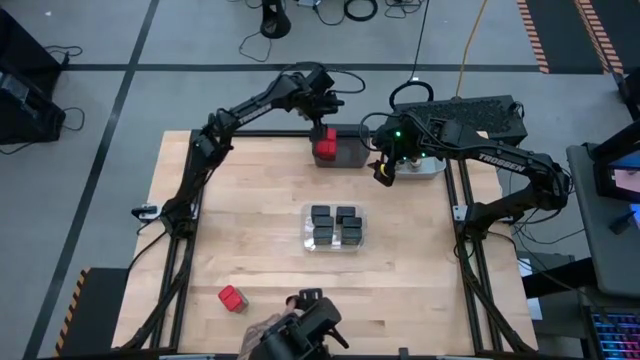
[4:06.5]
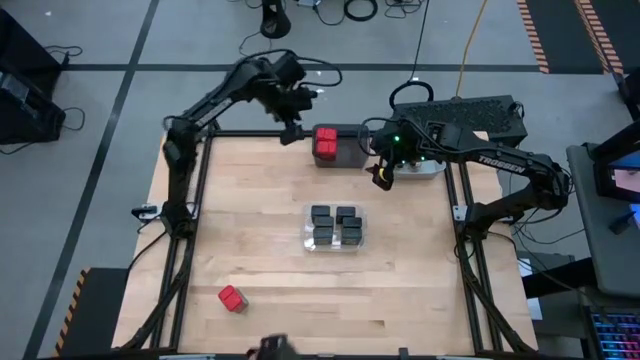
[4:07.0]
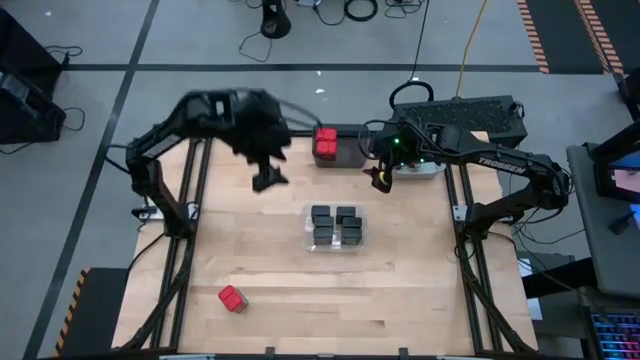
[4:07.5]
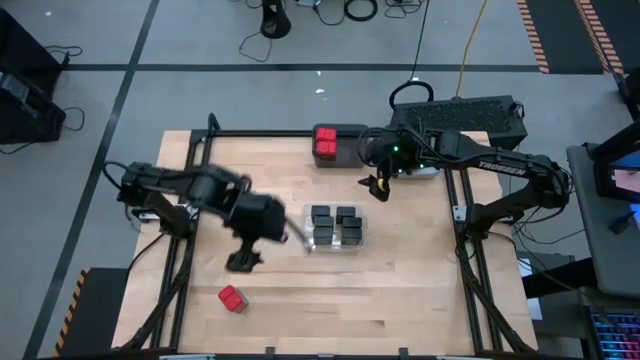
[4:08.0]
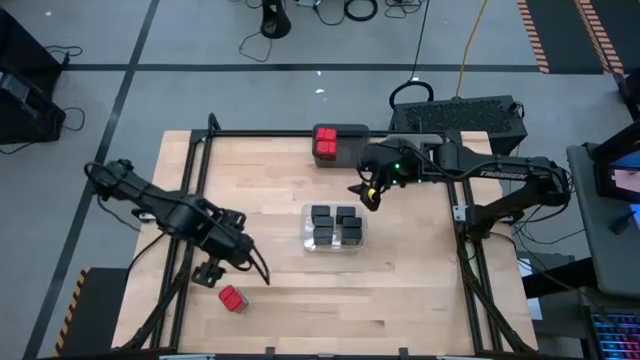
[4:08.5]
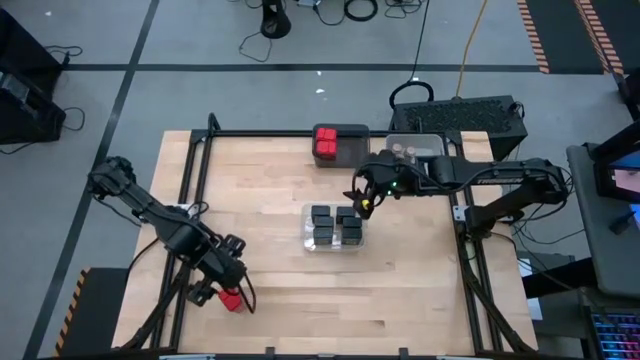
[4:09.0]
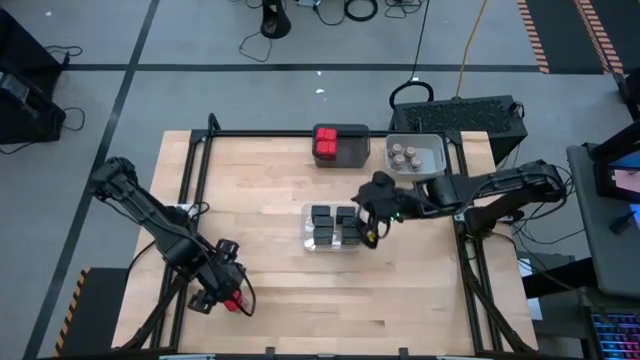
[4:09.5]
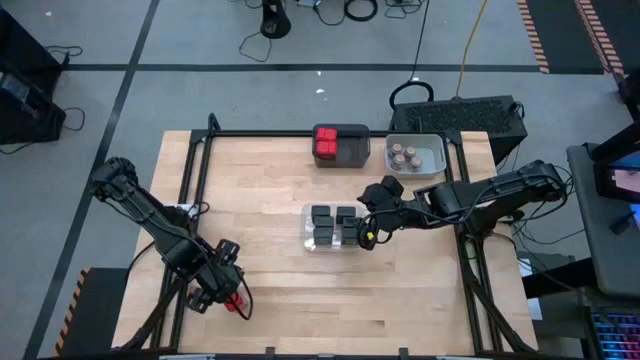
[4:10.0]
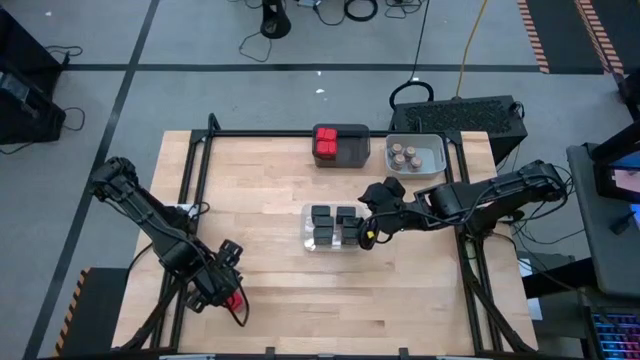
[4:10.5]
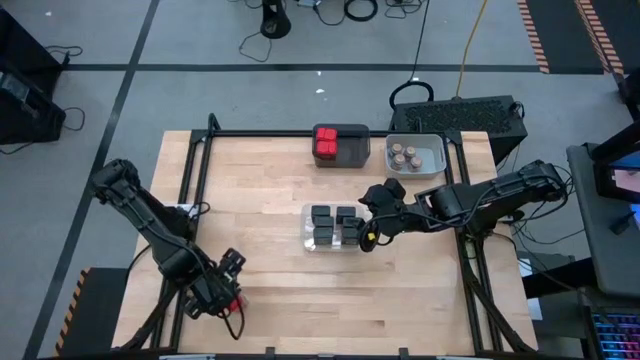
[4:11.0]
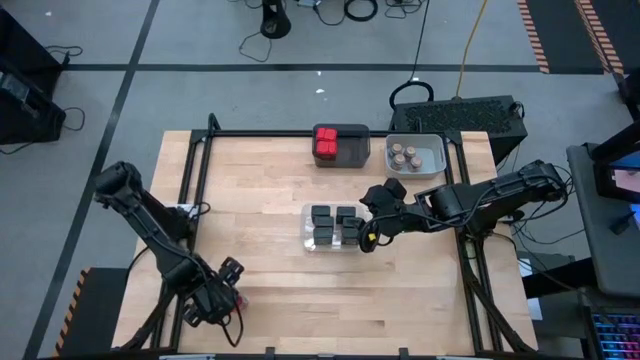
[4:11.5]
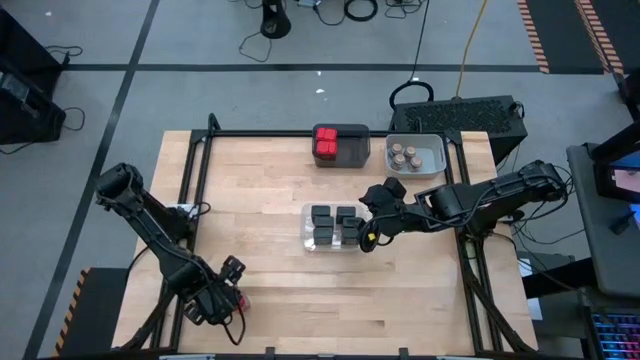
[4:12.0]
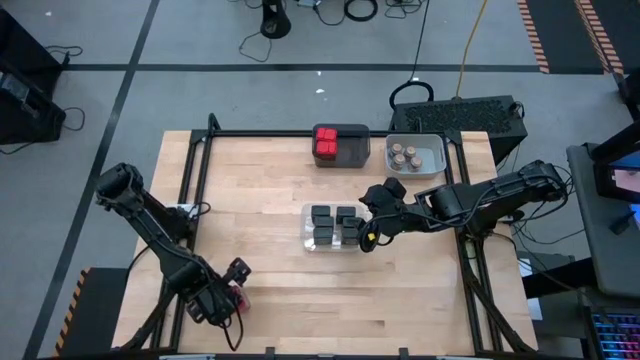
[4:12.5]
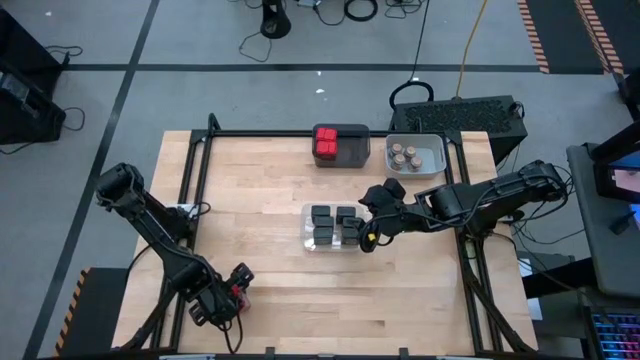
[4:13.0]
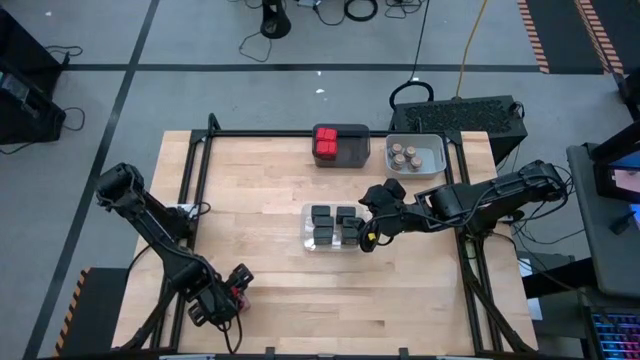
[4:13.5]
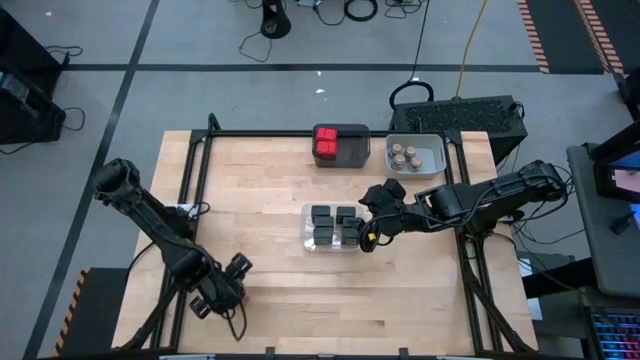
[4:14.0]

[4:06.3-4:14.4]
Task: Sort spices by type
Put the red seasoning can into the black bin

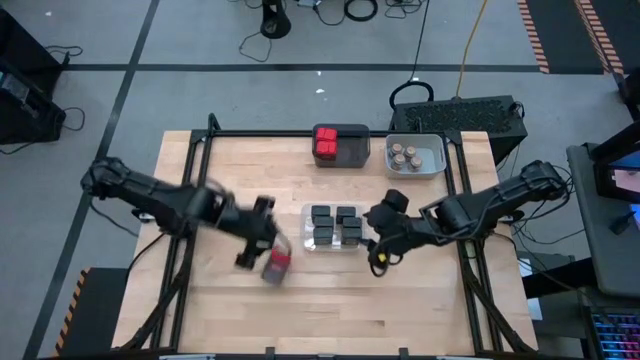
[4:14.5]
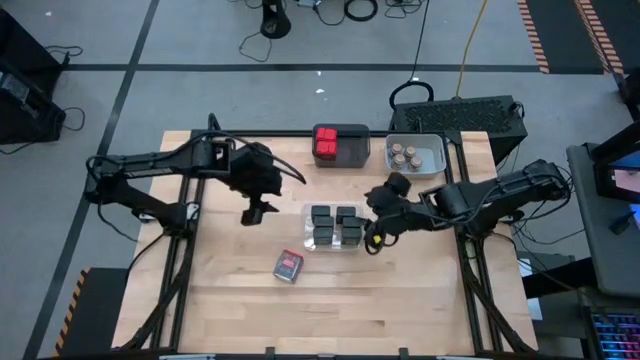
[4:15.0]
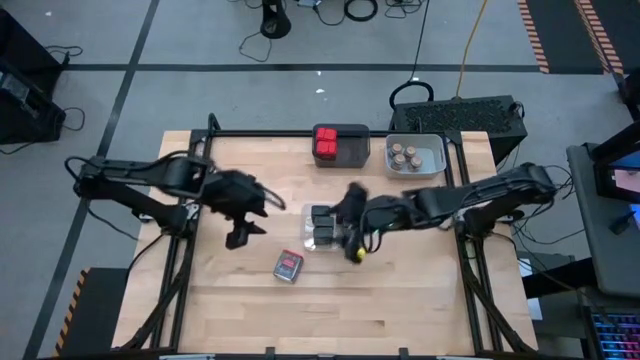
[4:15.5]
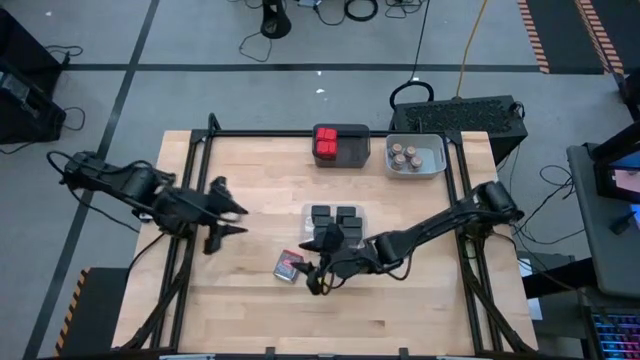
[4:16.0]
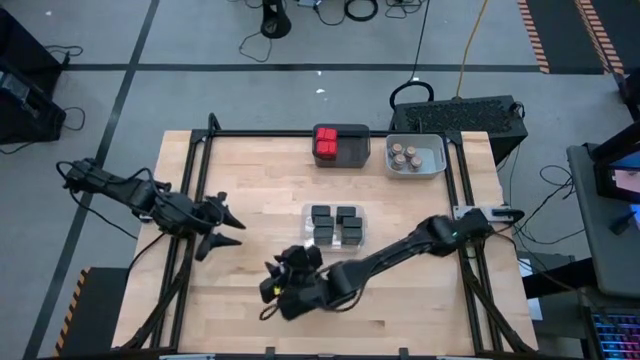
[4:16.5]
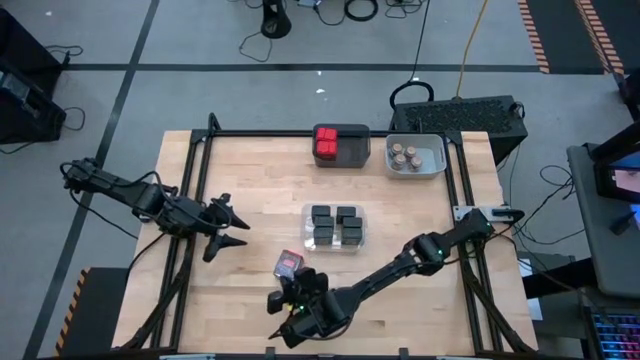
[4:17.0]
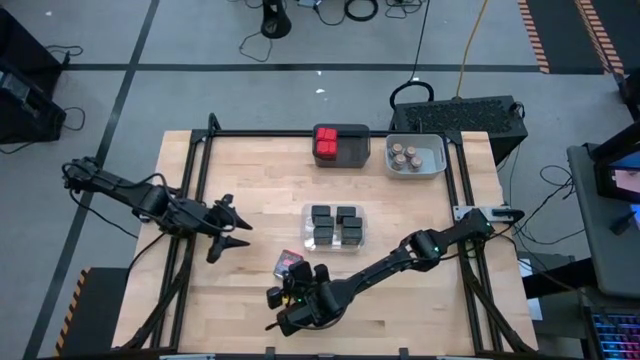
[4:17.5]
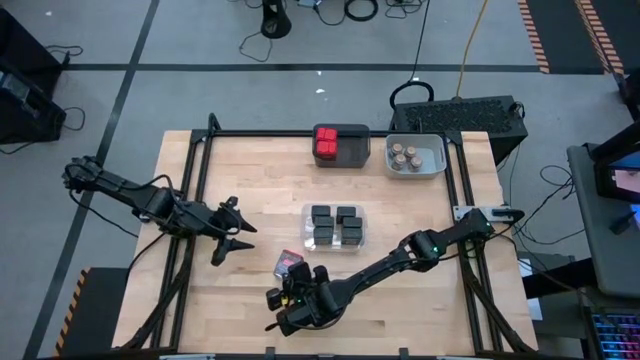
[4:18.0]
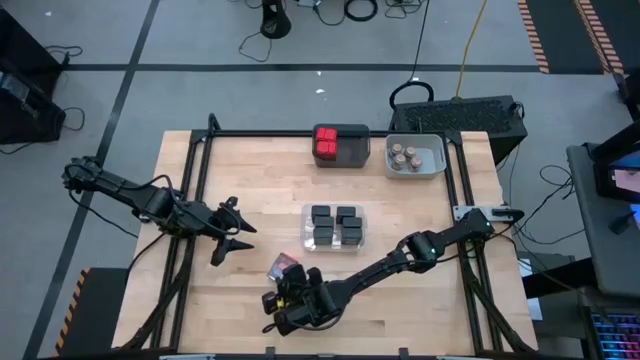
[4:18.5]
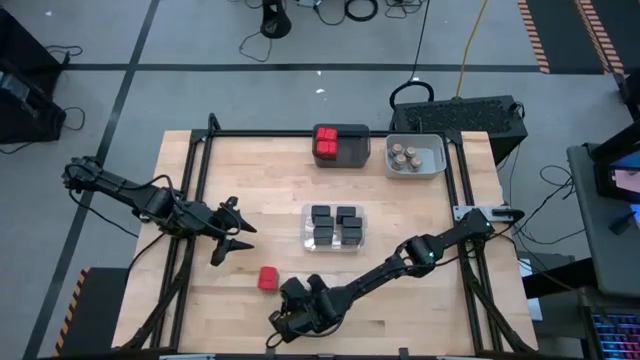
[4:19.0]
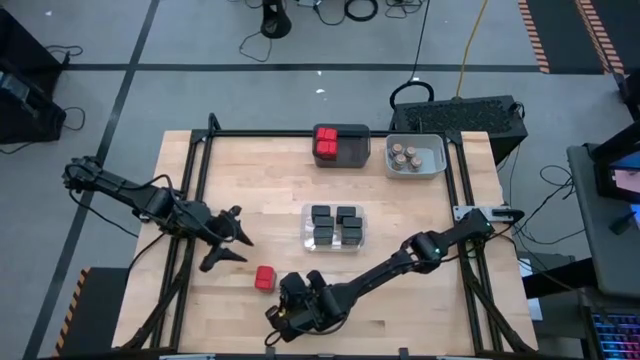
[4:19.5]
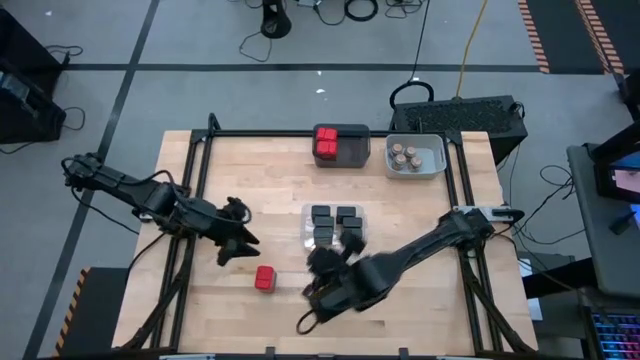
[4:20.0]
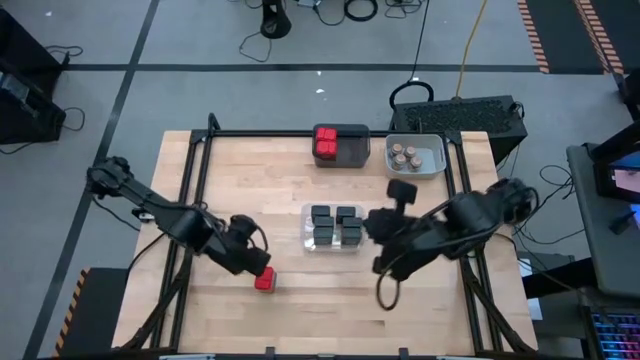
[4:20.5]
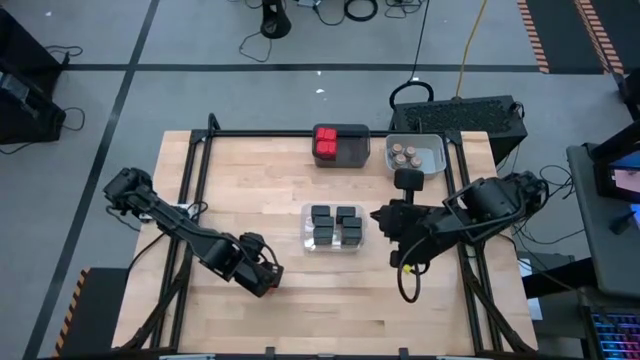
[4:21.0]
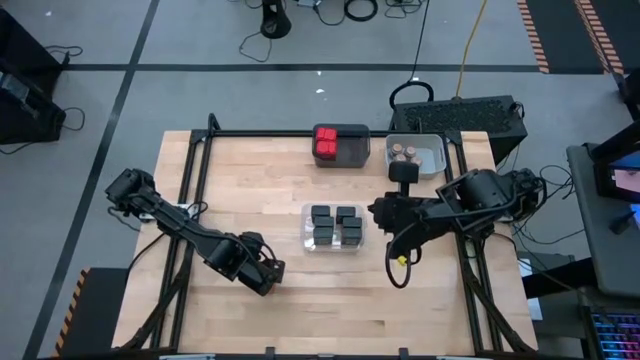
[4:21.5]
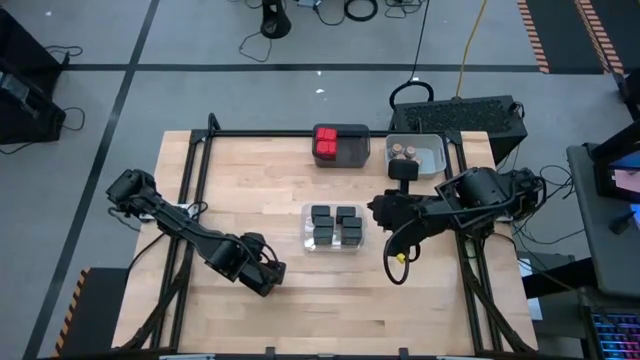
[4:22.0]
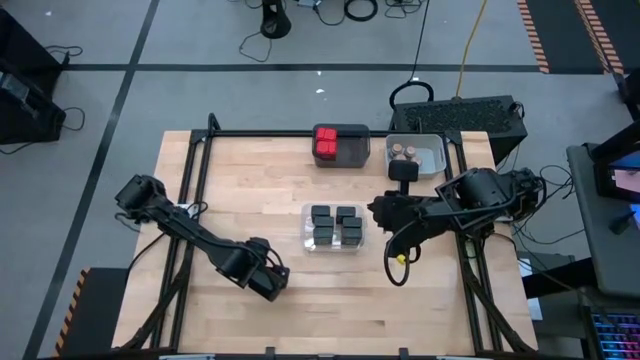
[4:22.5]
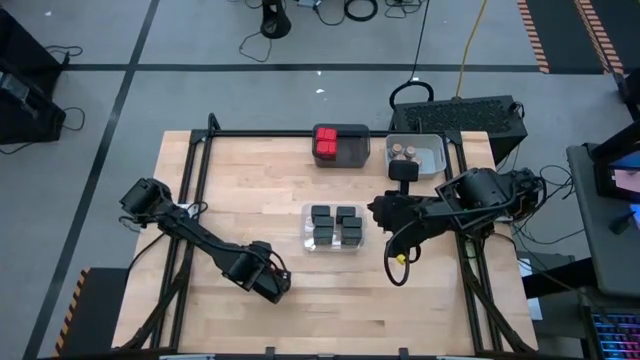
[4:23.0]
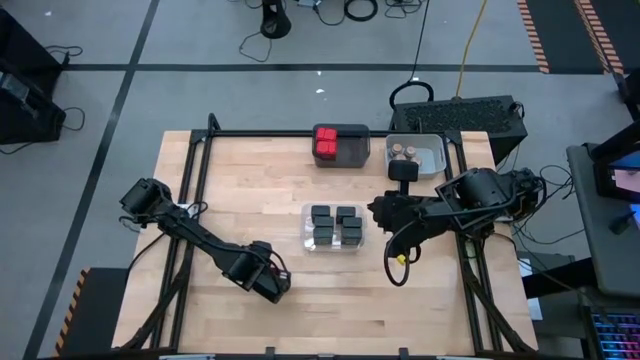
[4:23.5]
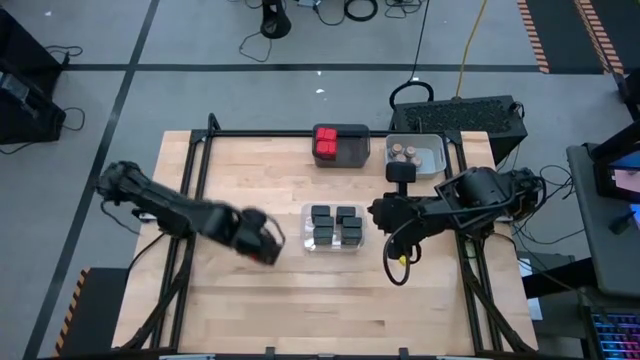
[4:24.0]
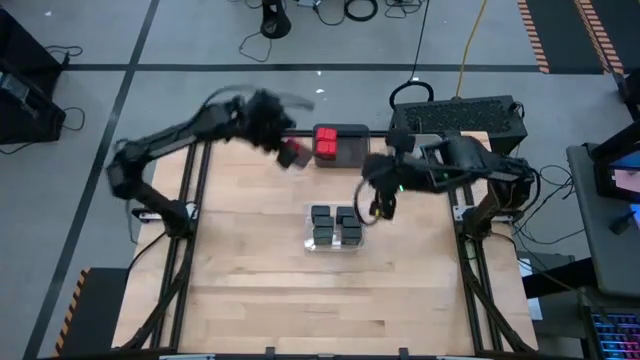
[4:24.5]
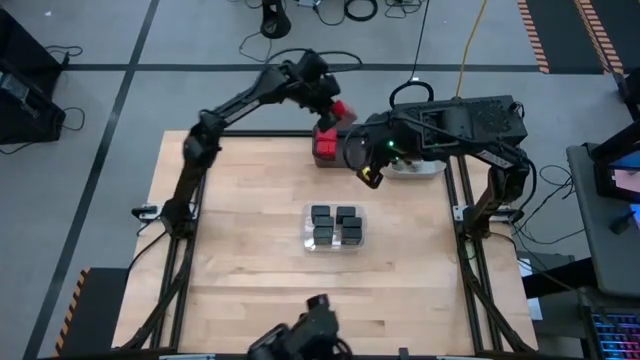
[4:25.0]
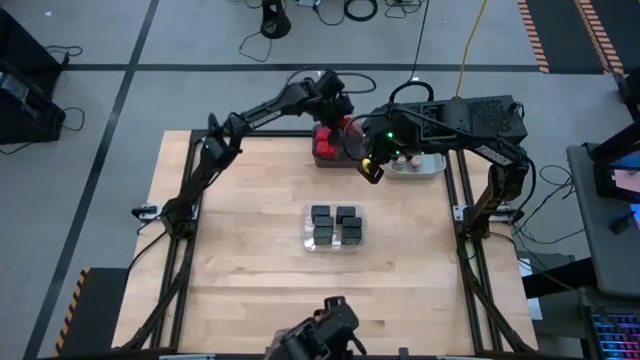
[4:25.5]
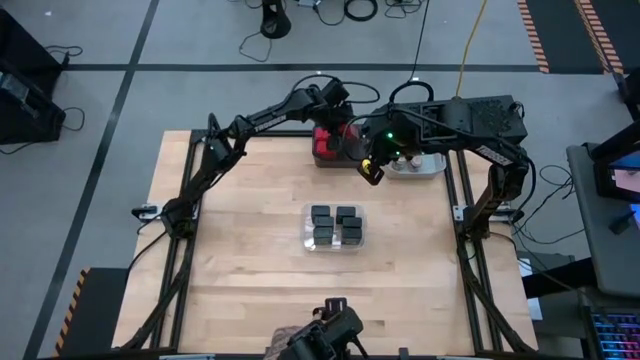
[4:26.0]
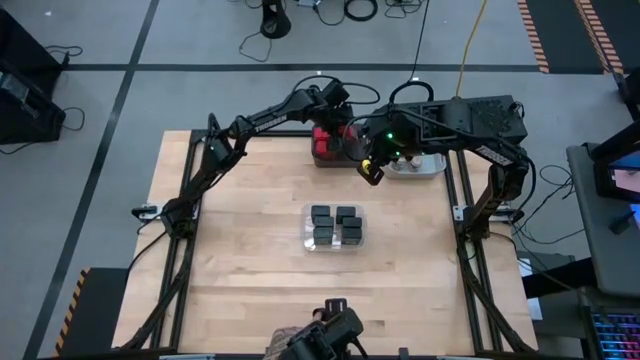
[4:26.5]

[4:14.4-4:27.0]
Put the red seasoning bottle into the black bin

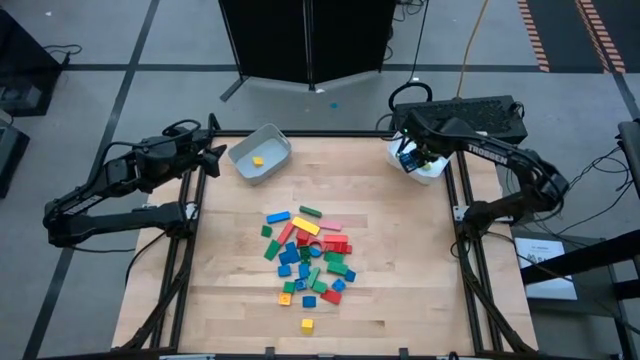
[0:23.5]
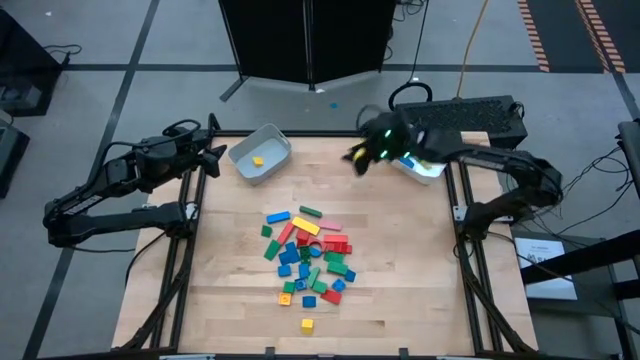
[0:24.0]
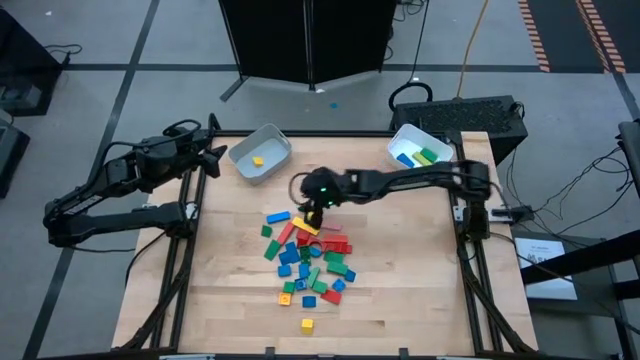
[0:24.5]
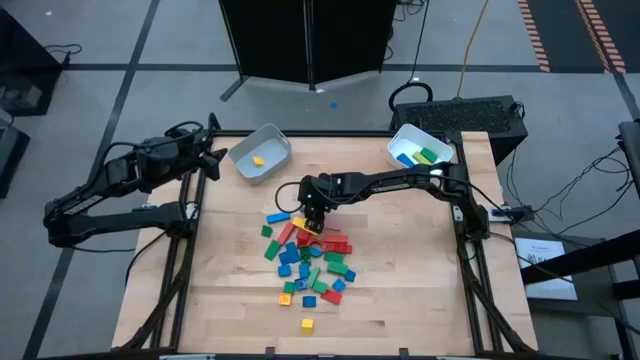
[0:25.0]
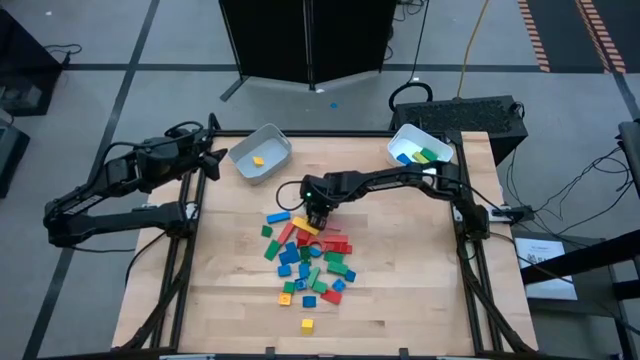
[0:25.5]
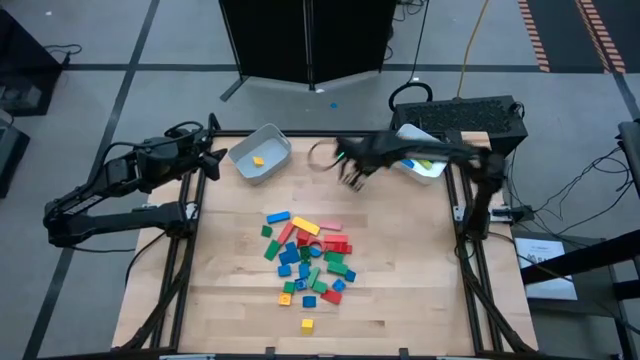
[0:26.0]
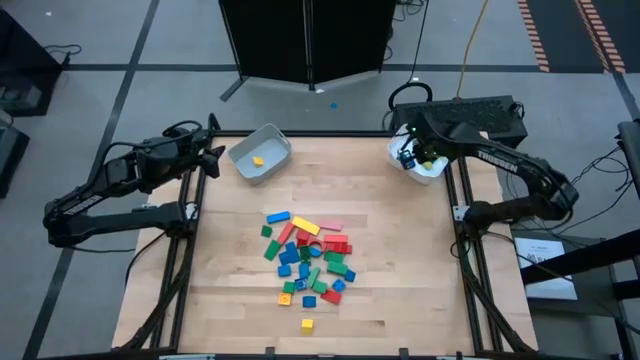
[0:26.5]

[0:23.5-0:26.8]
Task: Sort blocks by size
Put the rectangular green block into the white bin
